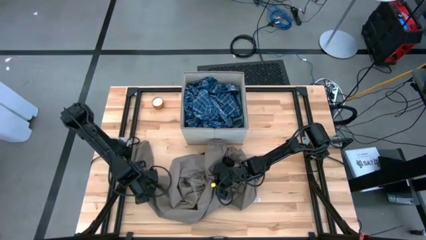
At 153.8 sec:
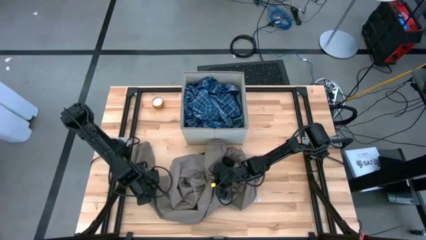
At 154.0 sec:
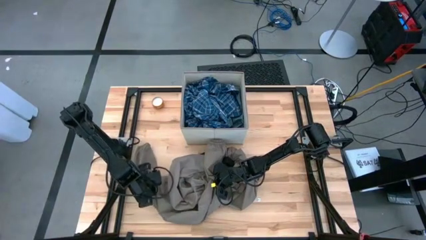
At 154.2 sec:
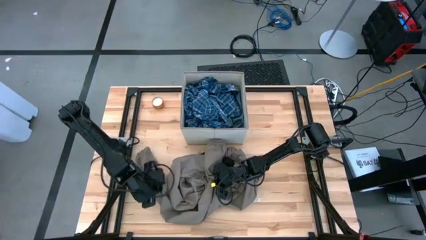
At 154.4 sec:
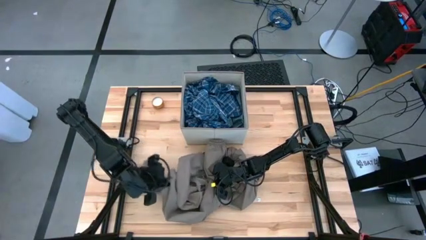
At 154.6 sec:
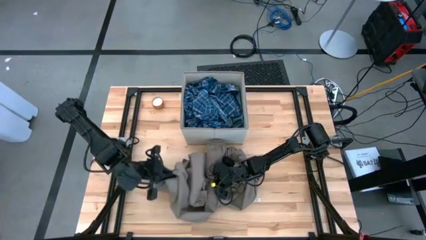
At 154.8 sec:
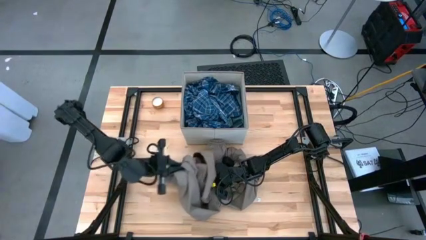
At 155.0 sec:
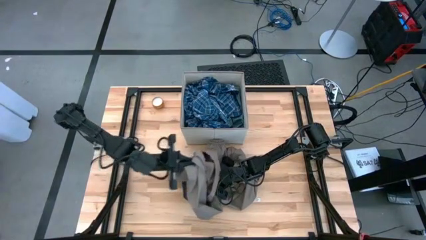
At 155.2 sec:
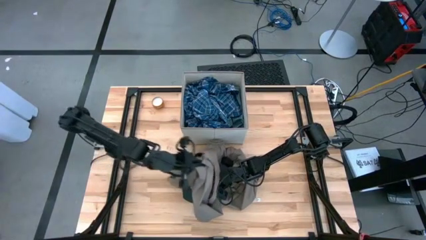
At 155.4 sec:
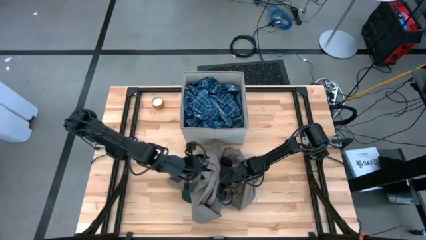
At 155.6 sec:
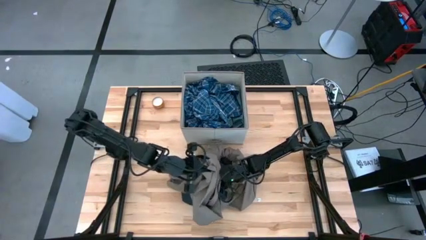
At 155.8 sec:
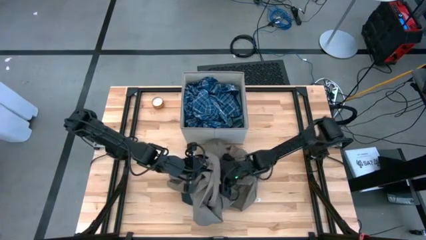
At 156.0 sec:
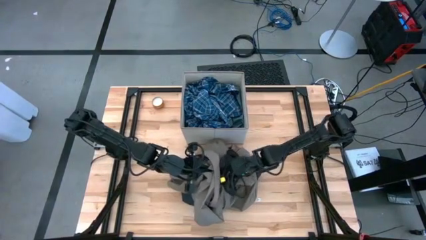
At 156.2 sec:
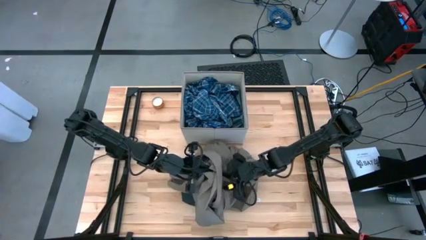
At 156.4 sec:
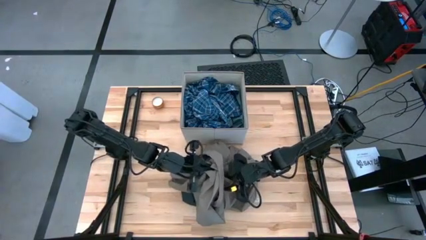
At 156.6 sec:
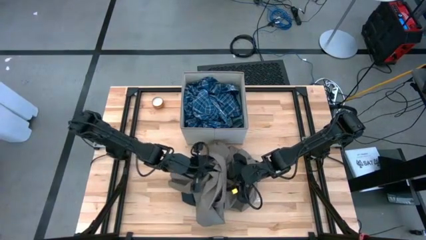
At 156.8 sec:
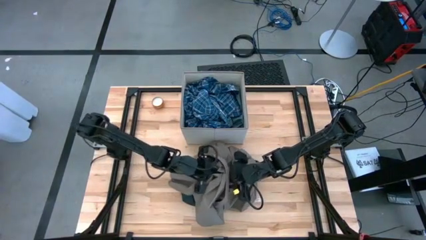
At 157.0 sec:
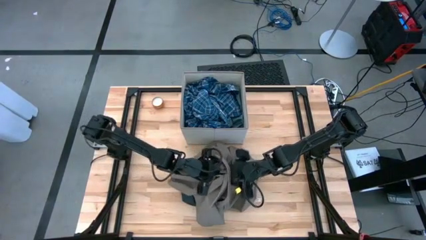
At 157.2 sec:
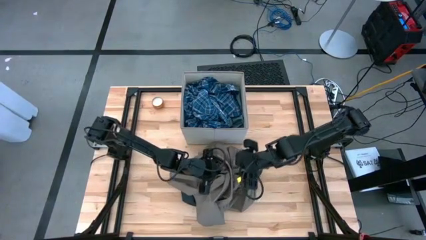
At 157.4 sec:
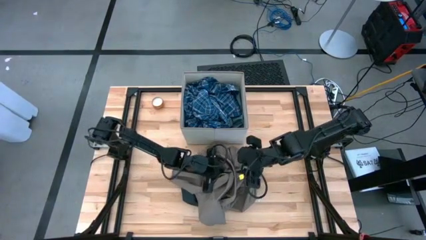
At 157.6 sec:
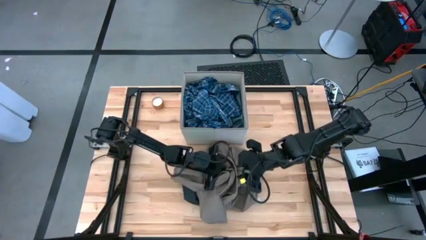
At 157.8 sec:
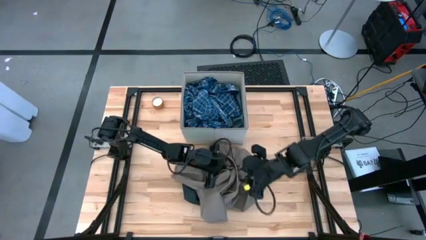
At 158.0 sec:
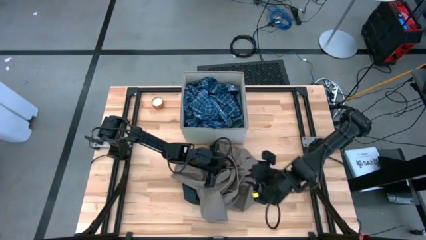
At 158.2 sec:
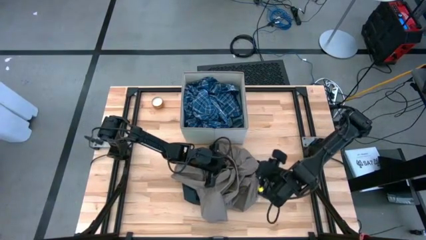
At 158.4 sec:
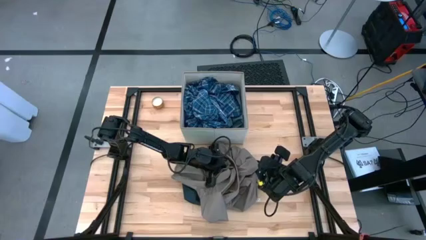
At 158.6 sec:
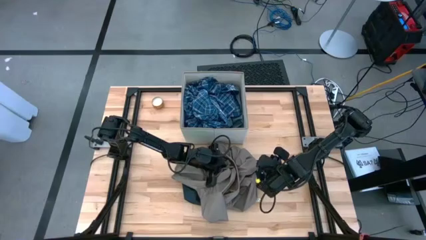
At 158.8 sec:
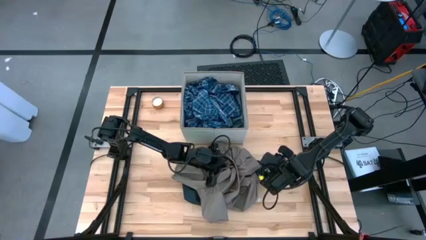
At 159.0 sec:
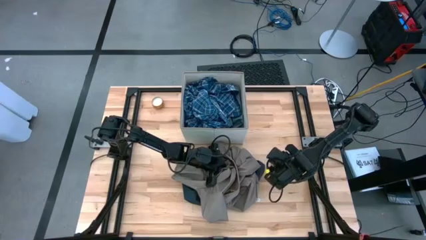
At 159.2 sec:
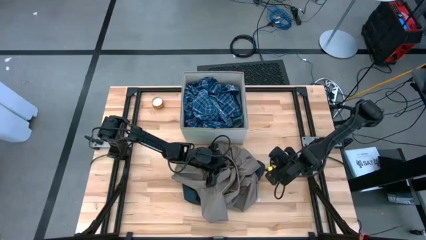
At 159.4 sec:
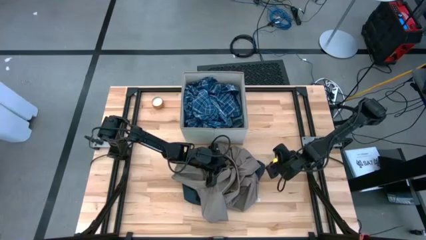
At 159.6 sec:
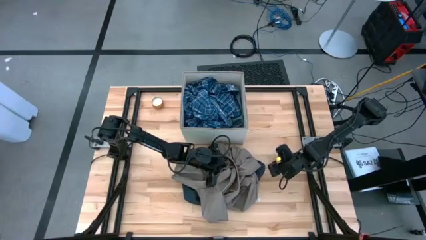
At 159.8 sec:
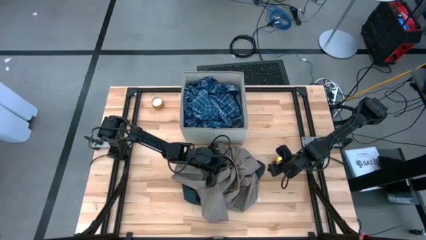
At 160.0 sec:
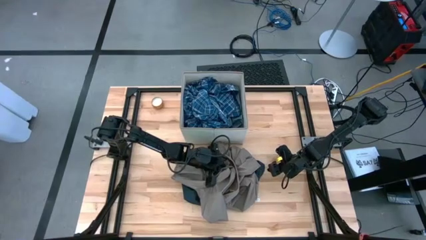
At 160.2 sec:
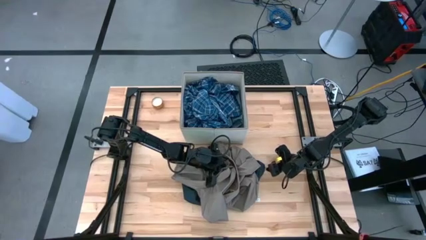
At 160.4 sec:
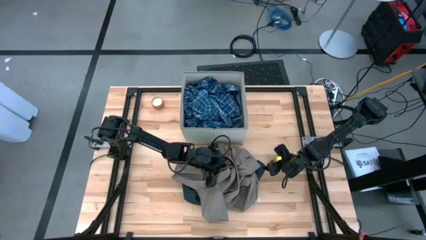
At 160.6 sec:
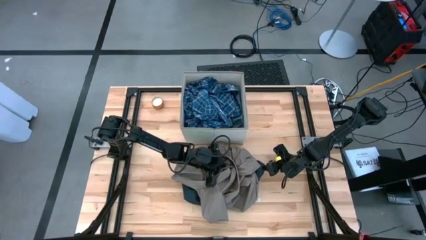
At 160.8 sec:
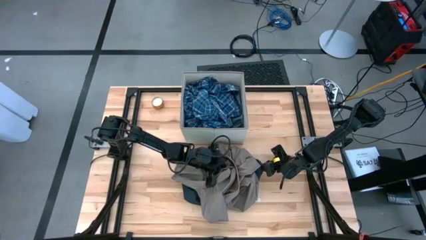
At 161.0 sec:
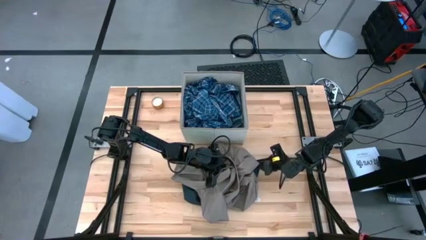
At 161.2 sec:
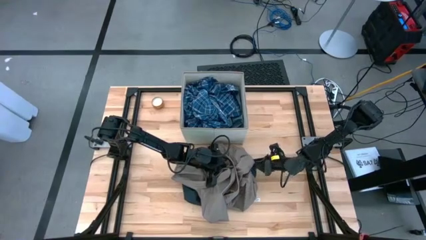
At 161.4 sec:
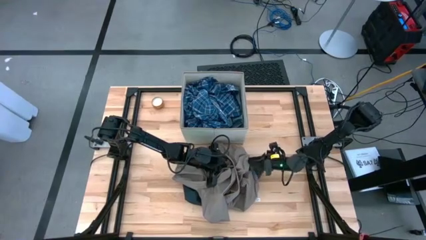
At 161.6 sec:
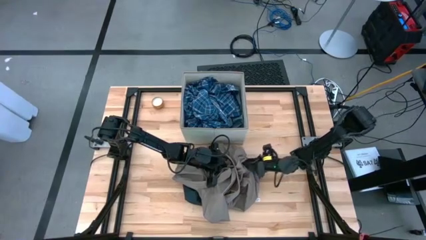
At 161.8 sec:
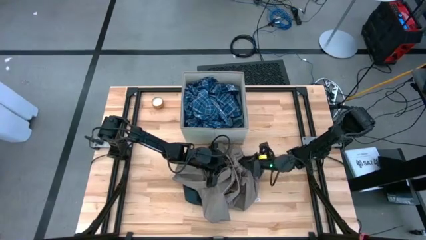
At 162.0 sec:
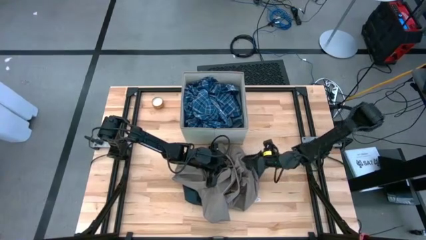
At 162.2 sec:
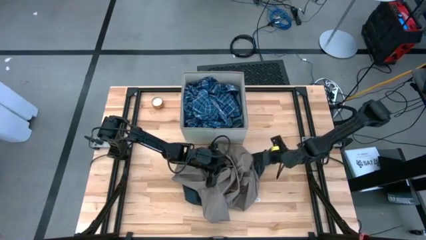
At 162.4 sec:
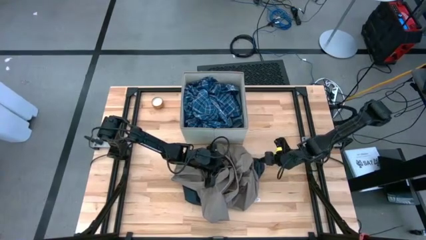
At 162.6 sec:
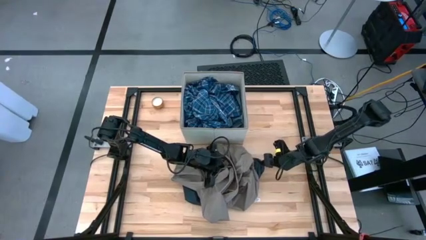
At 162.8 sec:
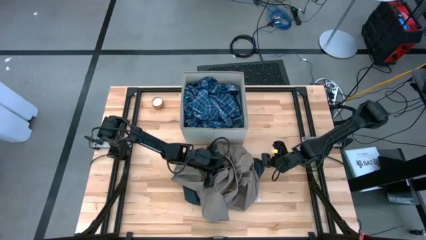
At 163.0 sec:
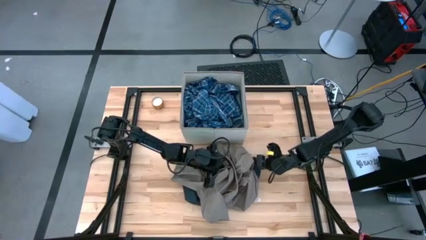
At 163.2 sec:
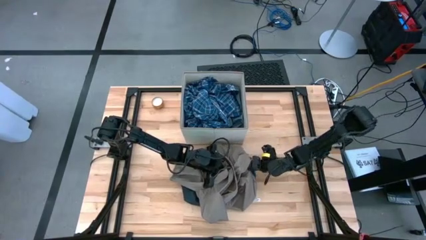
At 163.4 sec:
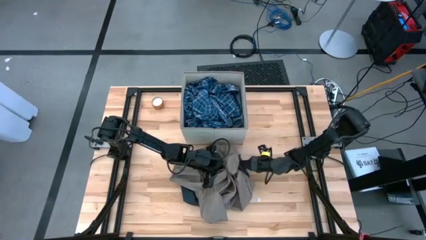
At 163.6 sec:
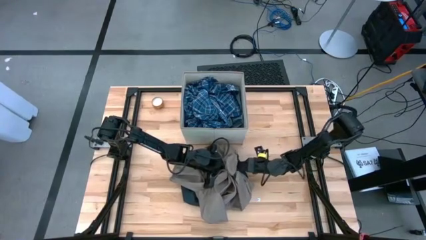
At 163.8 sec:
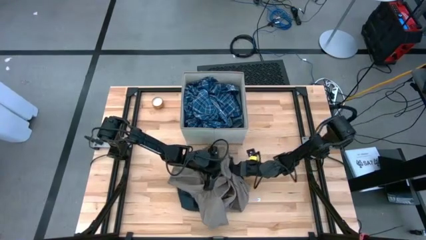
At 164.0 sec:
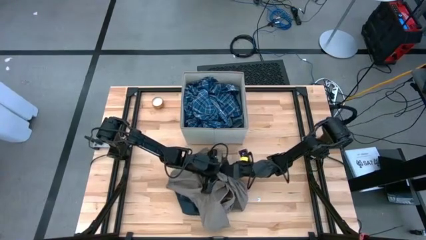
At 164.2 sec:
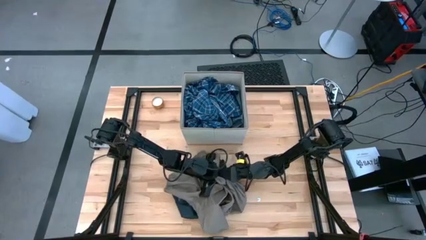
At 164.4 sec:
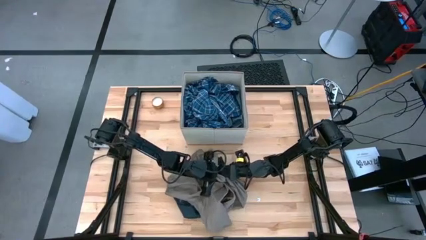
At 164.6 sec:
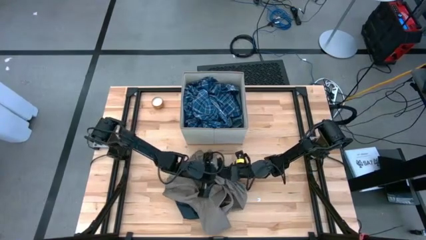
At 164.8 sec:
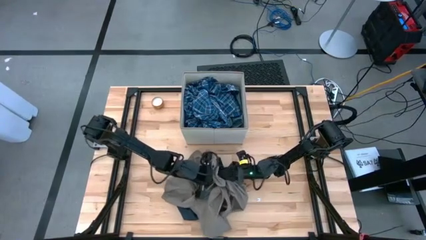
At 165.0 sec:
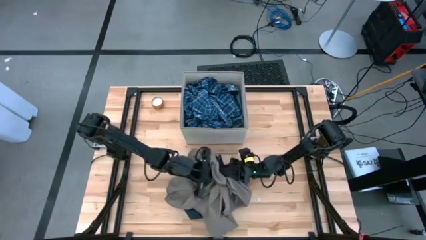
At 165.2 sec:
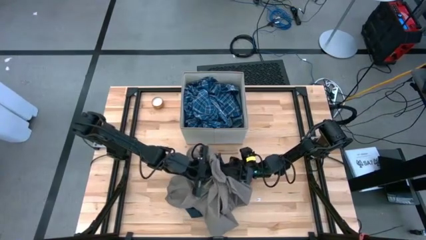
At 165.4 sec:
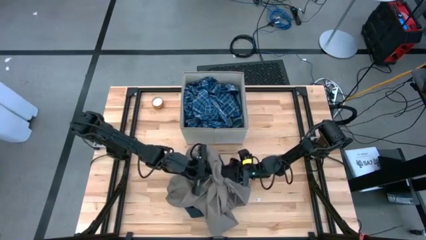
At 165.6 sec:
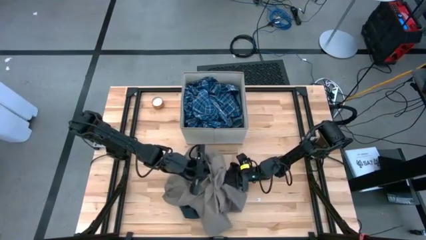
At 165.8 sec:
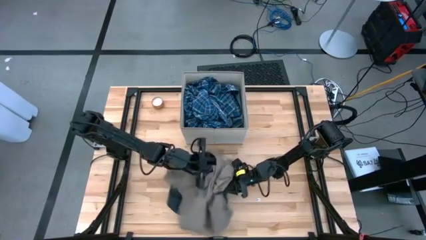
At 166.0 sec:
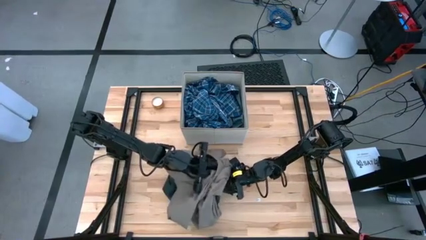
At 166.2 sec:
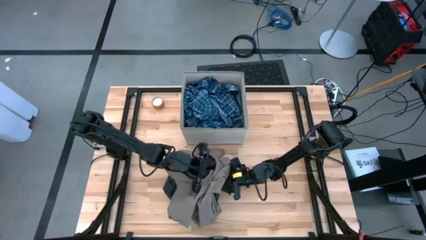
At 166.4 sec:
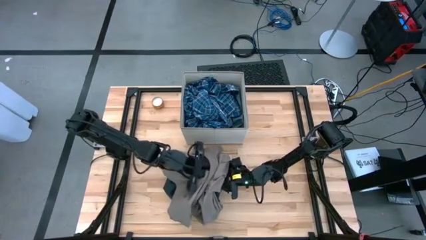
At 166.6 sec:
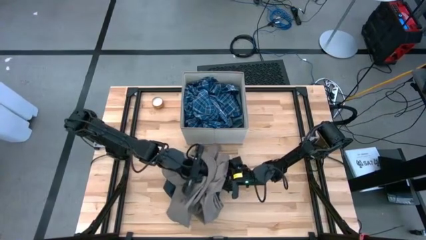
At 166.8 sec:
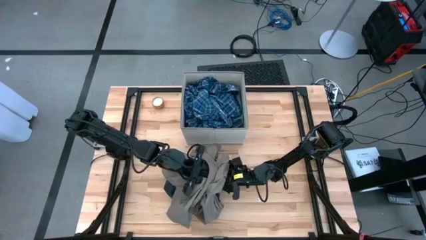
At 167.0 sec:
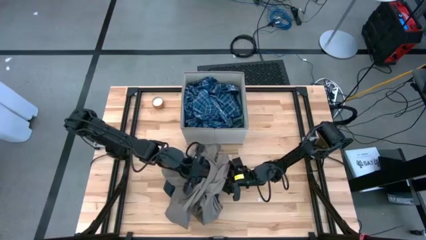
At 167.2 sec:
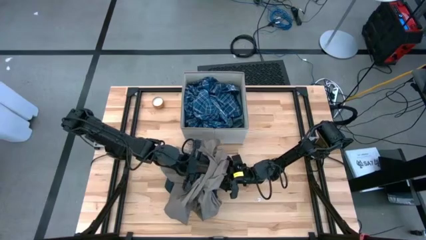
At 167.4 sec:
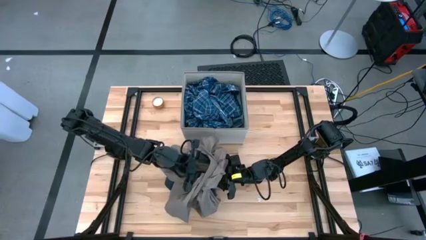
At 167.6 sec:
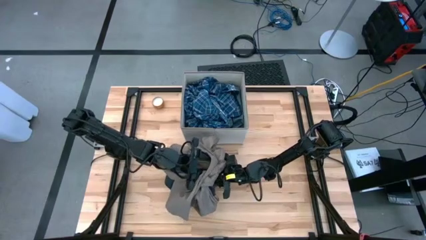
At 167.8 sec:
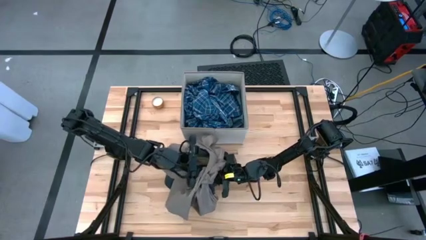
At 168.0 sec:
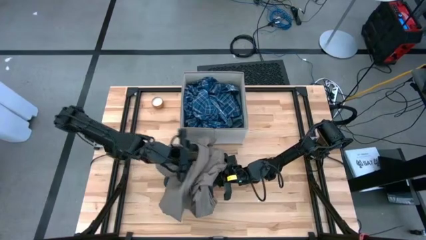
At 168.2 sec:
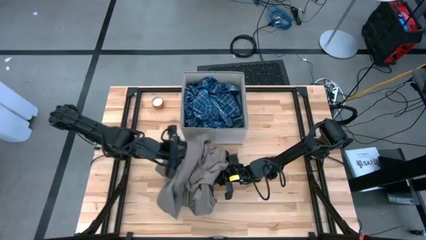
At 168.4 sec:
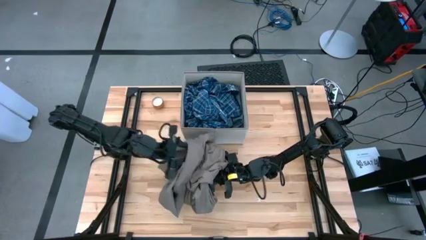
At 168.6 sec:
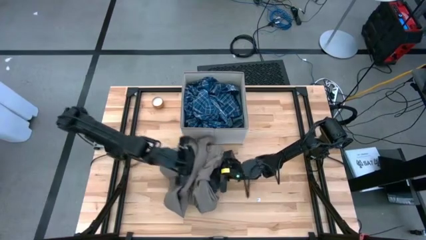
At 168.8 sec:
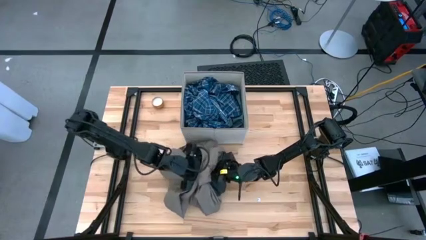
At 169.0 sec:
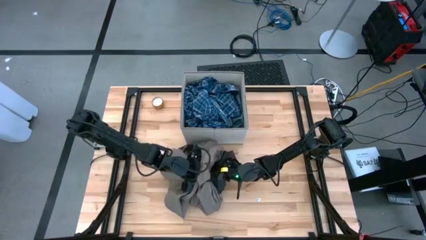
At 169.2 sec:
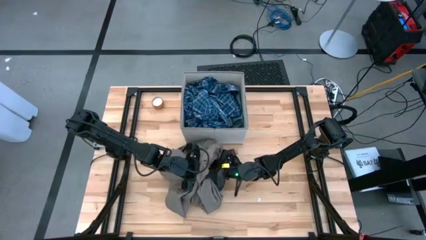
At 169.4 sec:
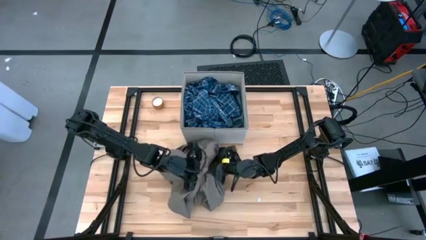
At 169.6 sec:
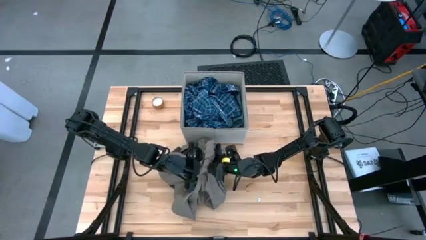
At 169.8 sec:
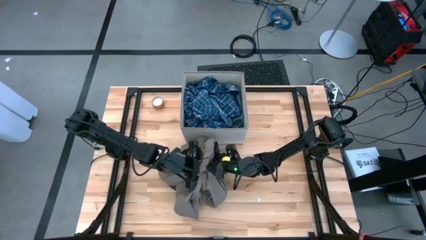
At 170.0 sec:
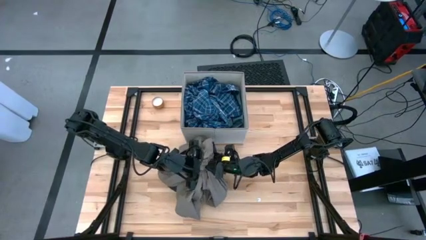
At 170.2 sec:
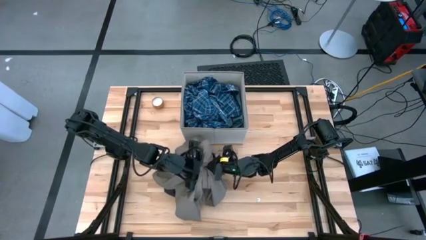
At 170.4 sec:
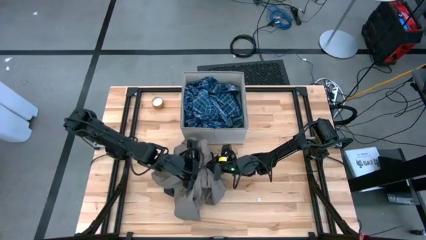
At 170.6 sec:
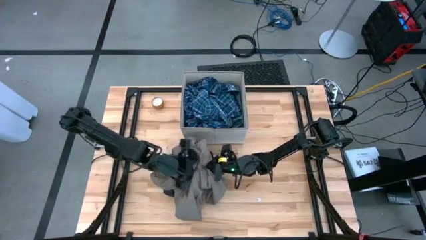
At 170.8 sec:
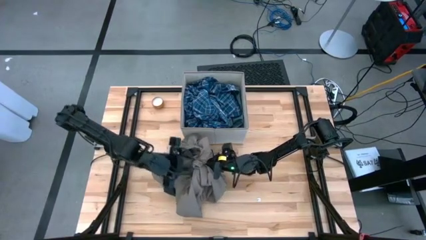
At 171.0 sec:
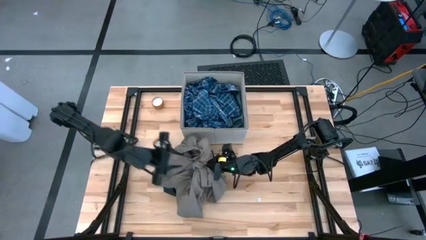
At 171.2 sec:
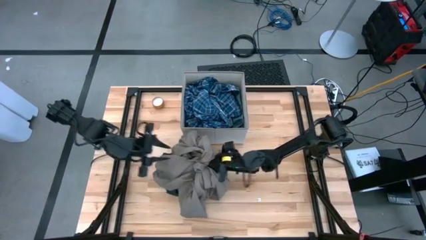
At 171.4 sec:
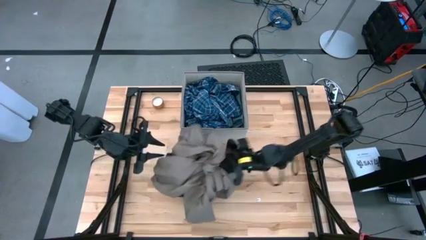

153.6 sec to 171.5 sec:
Task: Sort clothes
Put the brown jacket into the laundry bin
